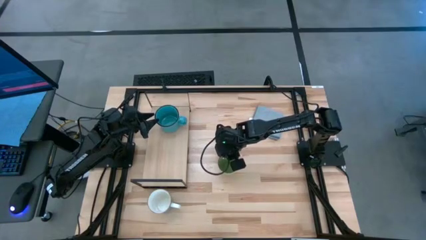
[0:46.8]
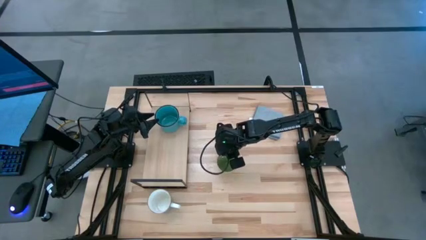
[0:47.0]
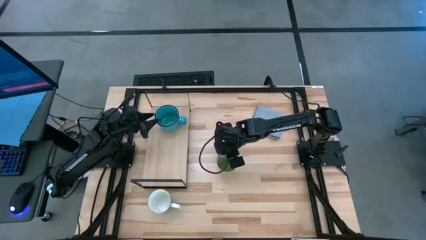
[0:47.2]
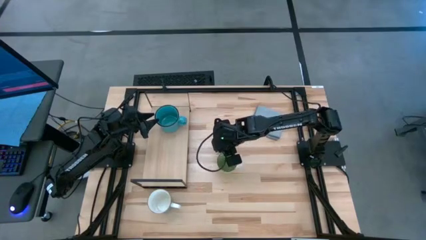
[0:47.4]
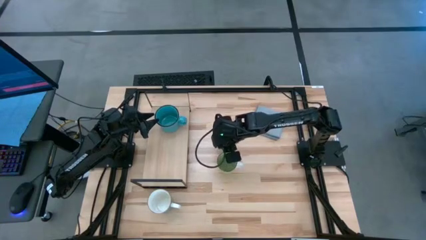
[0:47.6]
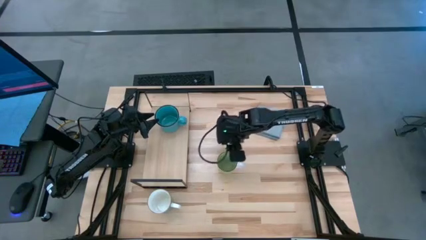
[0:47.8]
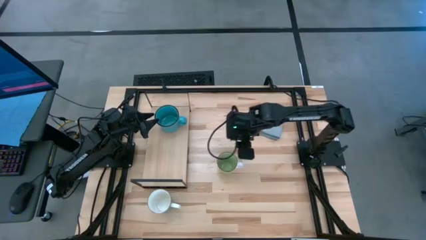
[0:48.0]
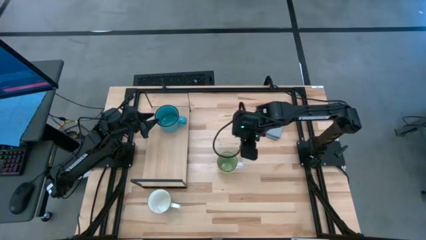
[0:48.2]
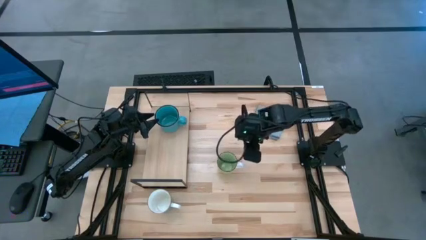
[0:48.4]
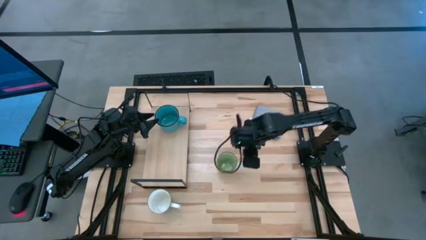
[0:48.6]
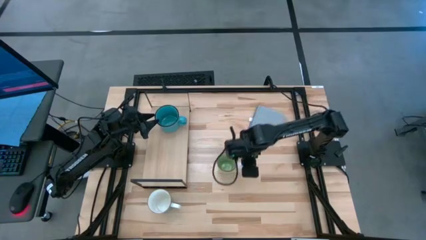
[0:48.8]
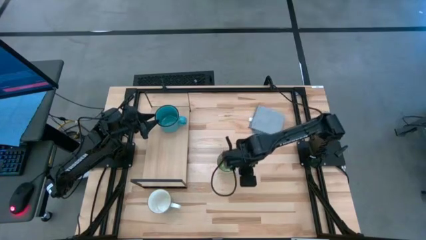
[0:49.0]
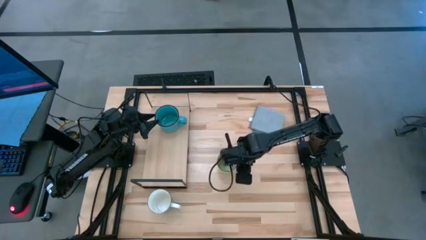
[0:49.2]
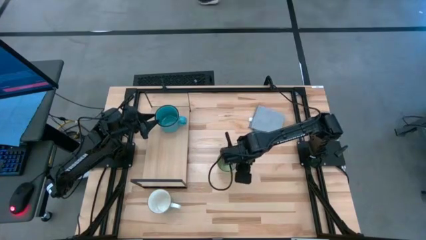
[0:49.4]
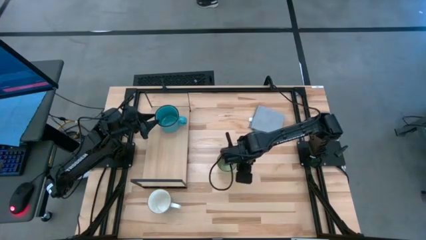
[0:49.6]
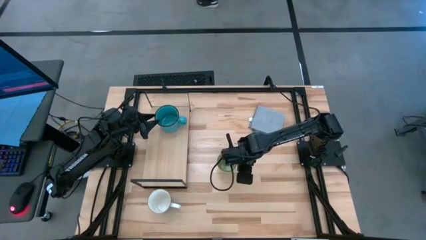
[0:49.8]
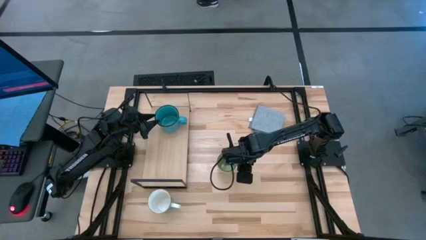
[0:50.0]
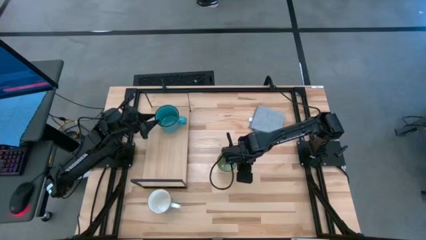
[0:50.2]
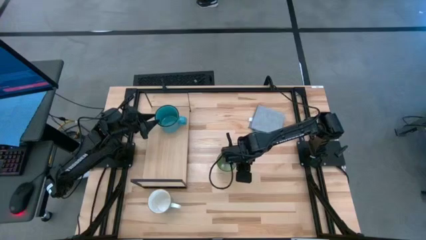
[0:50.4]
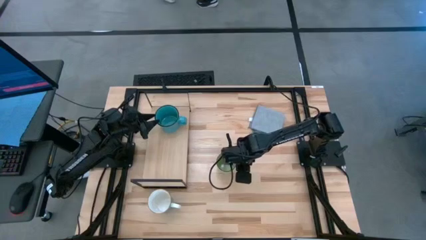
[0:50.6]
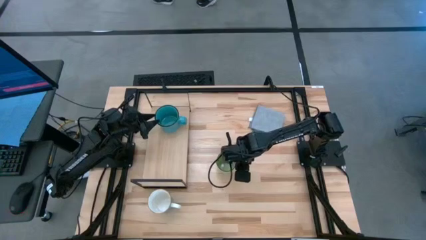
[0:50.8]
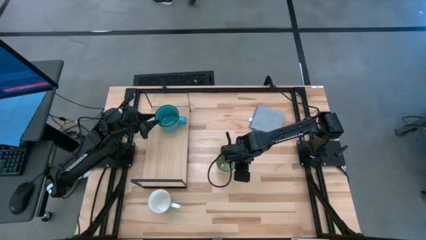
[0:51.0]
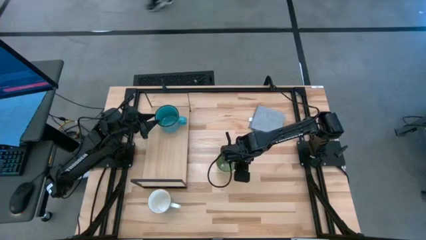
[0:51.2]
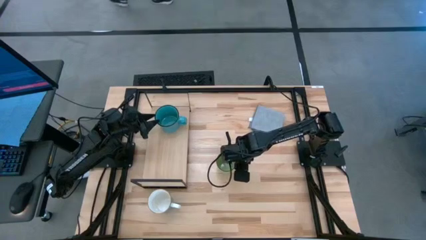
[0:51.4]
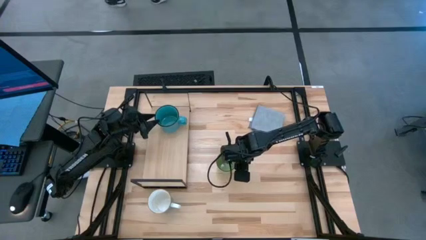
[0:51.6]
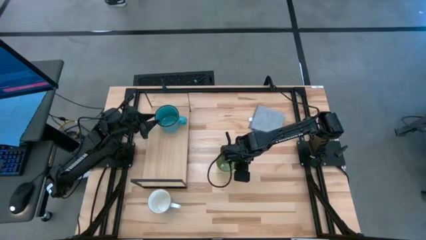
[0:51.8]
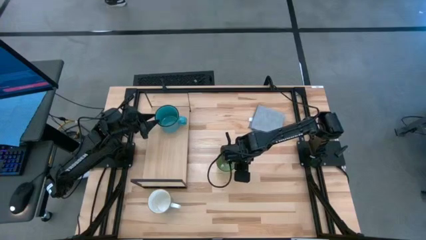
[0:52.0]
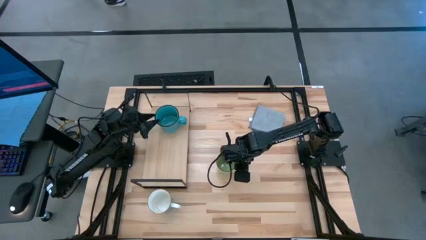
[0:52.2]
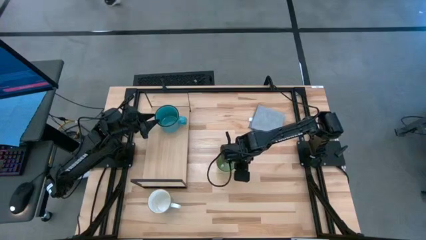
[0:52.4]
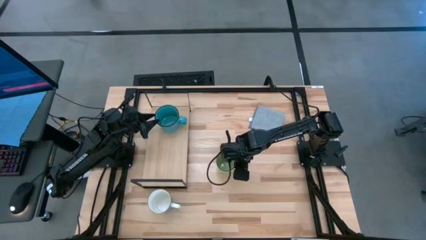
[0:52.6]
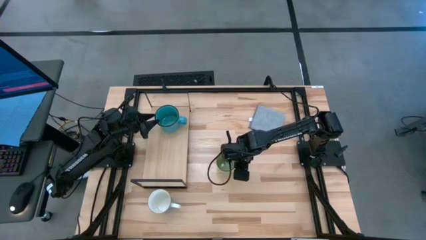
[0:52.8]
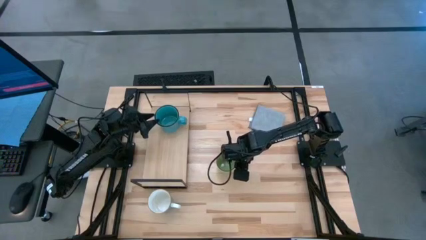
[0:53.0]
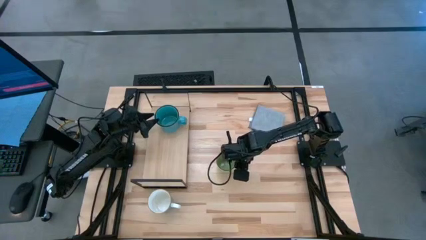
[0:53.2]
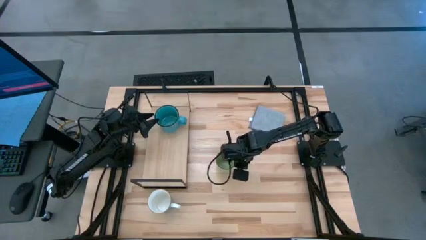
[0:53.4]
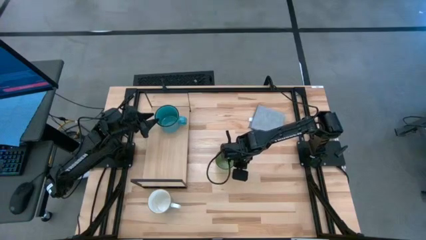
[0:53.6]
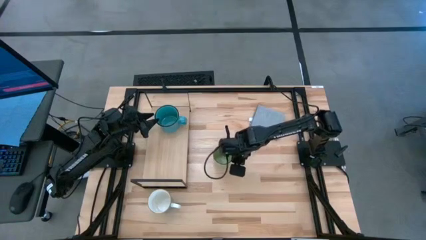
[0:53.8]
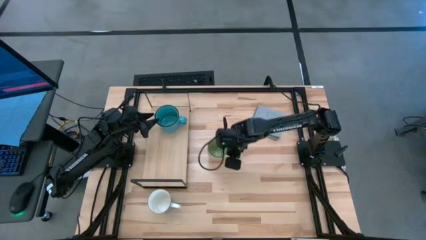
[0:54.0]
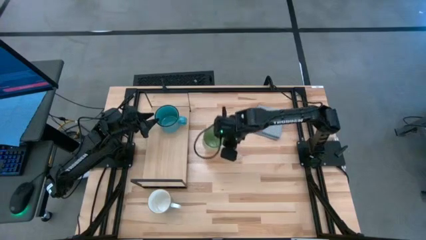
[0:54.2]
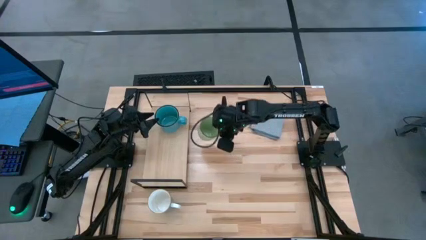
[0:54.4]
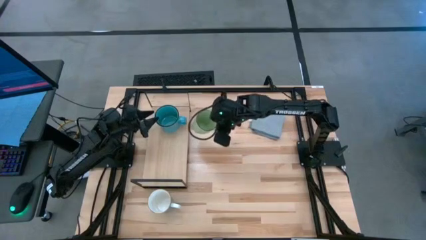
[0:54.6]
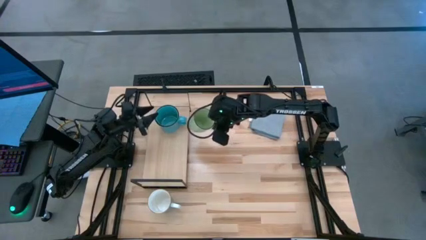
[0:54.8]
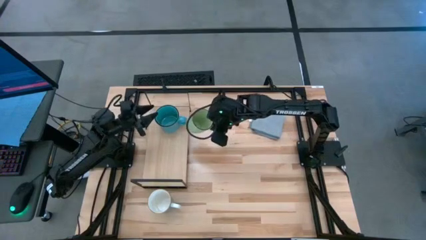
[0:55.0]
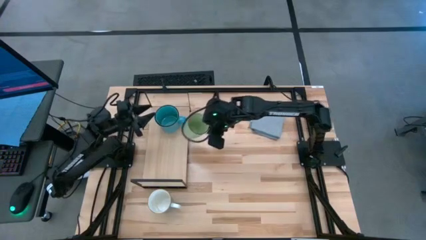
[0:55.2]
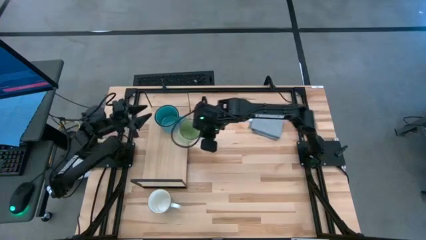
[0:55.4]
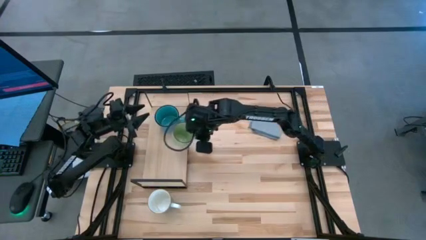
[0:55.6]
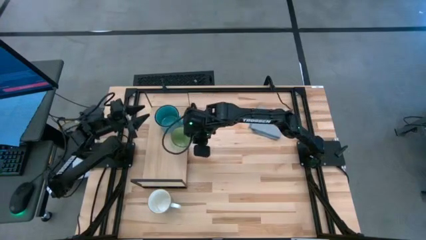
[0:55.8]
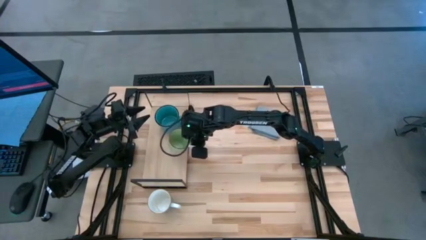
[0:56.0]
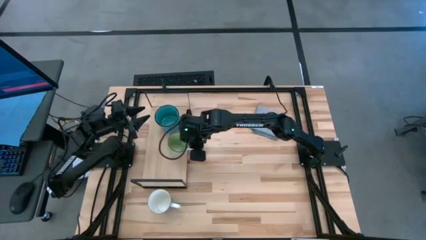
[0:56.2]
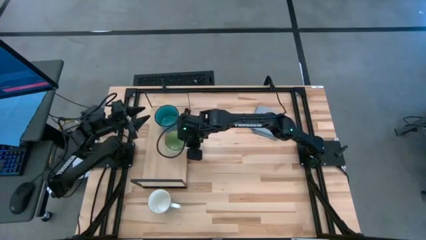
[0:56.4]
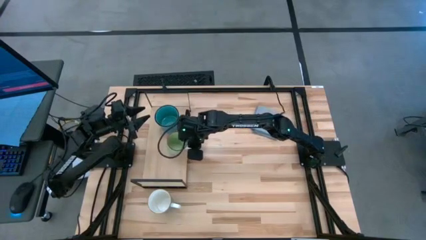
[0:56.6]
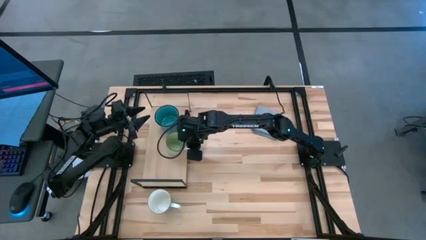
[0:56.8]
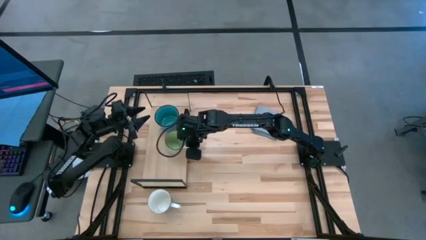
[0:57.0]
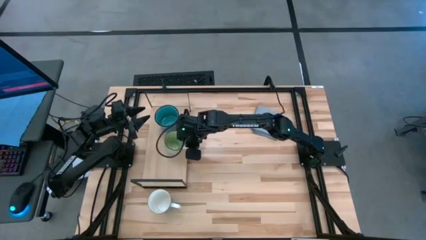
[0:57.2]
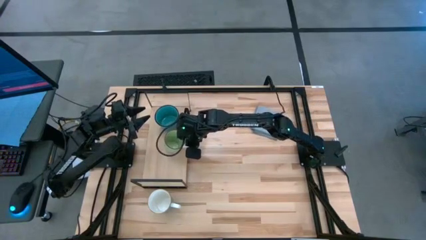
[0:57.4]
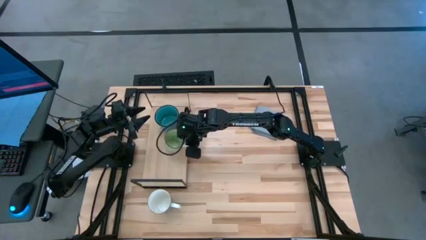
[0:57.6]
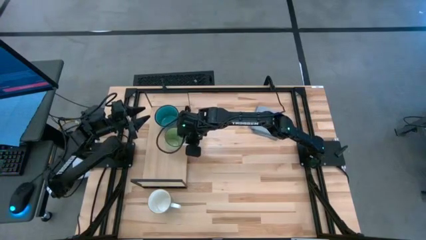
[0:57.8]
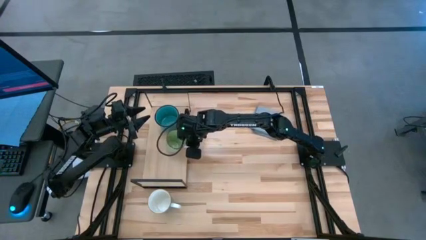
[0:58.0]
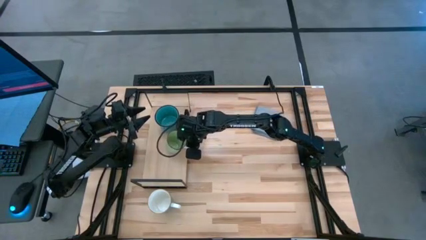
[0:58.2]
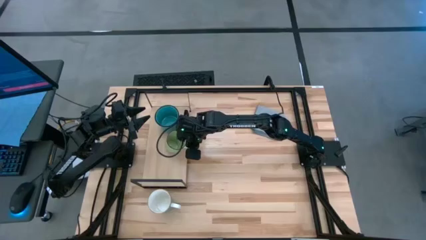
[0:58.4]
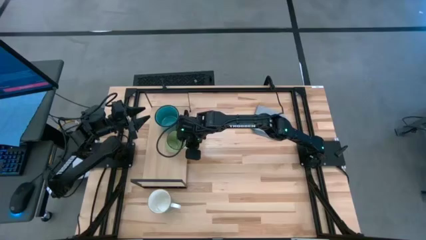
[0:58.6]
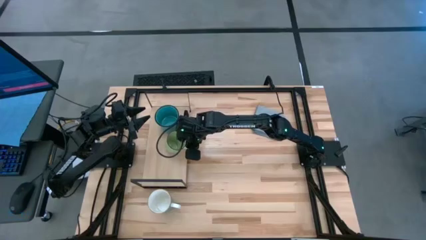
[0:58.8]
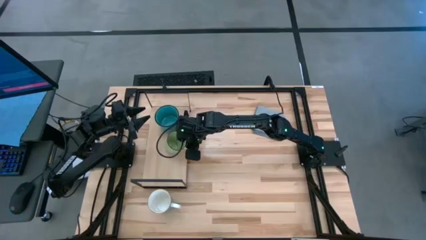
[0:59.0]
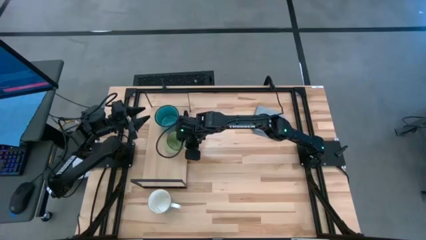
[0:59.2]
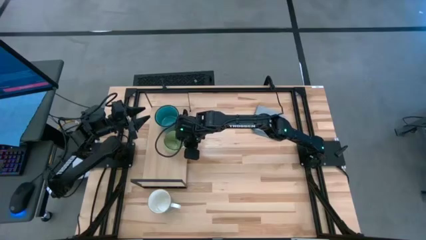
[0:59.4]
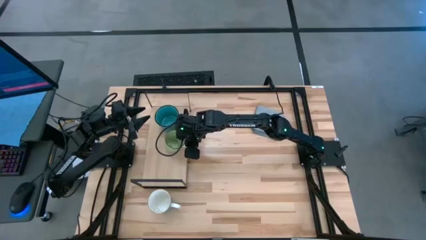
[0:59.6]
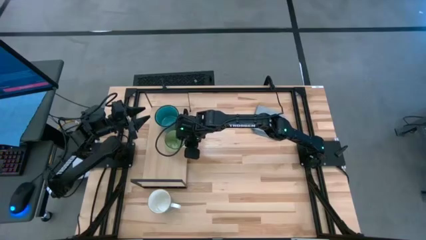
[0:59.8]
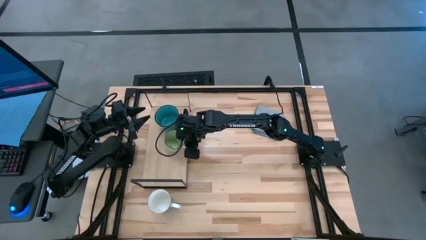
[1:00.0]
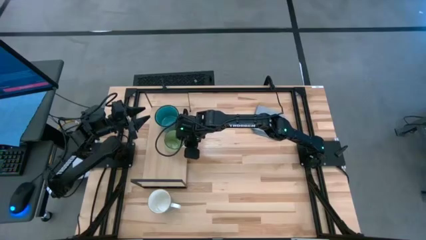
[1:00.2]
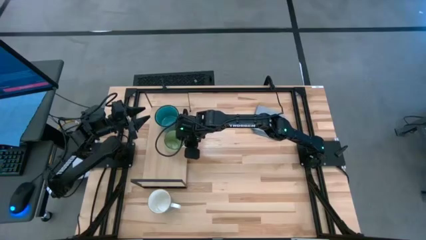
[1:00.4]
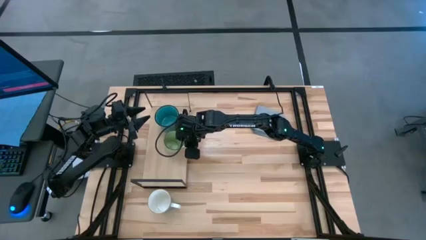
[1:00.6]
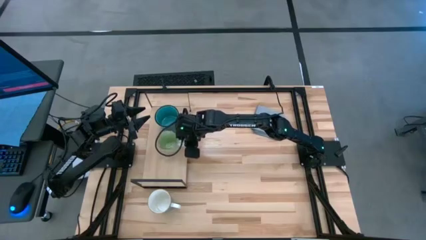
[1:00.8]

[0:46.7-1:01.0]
Task: Stack small to large cups/mugs on shelf
Put the green mug on the shelf

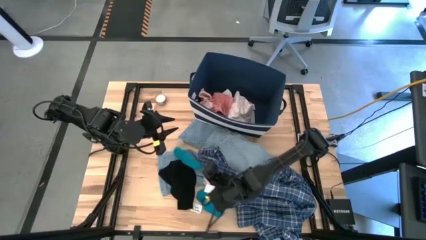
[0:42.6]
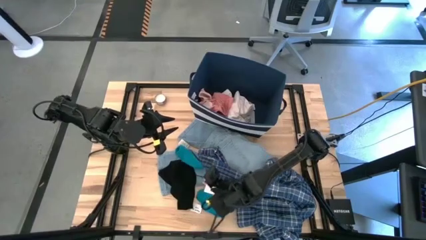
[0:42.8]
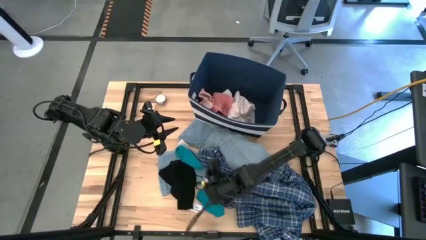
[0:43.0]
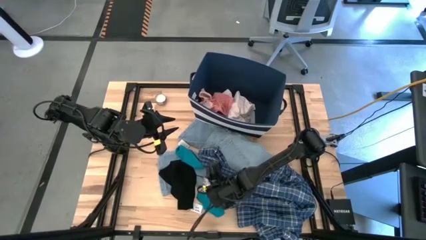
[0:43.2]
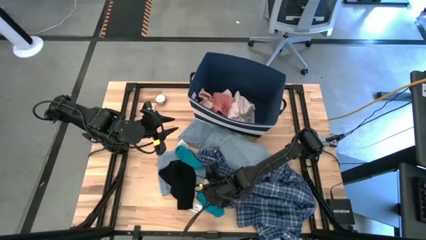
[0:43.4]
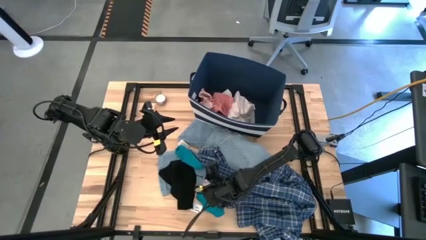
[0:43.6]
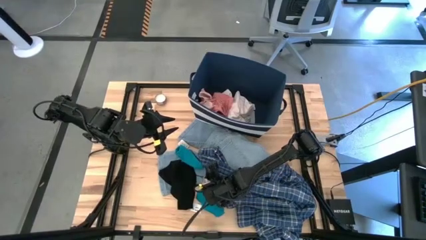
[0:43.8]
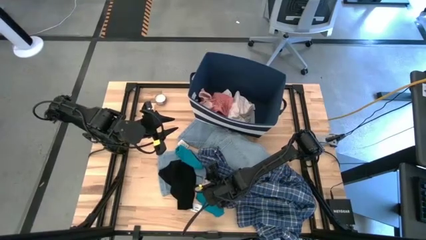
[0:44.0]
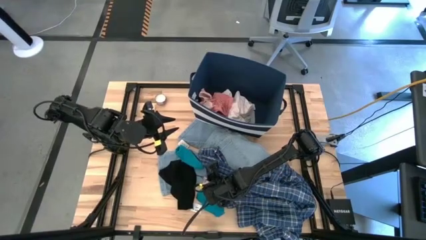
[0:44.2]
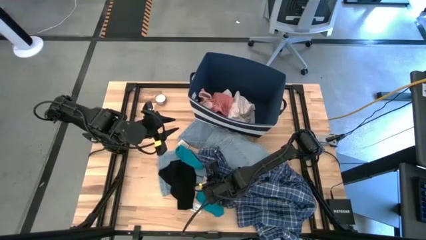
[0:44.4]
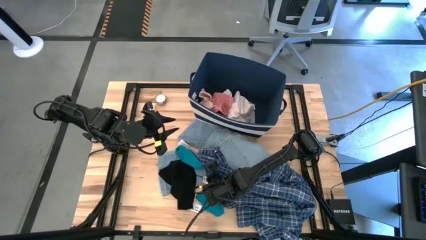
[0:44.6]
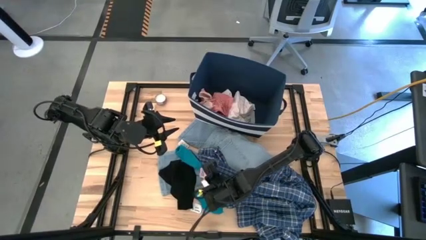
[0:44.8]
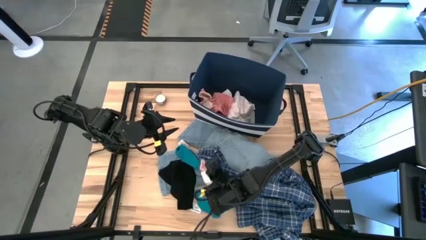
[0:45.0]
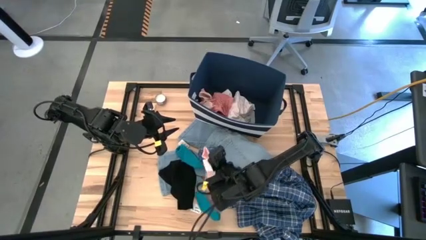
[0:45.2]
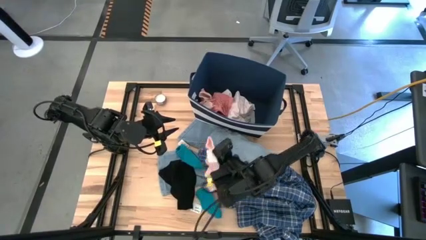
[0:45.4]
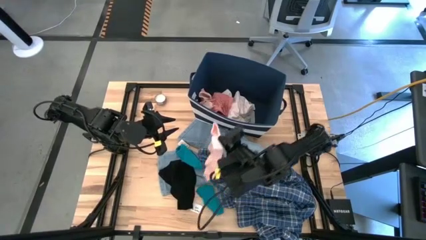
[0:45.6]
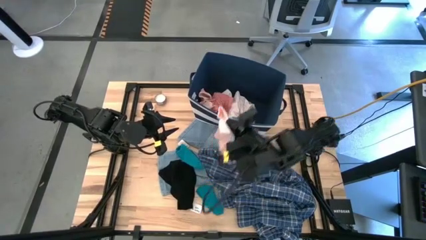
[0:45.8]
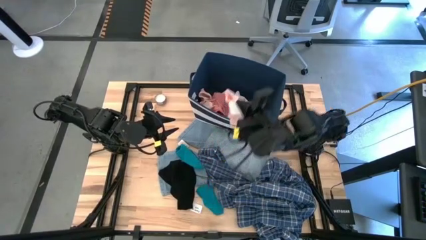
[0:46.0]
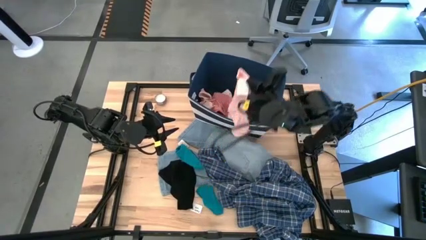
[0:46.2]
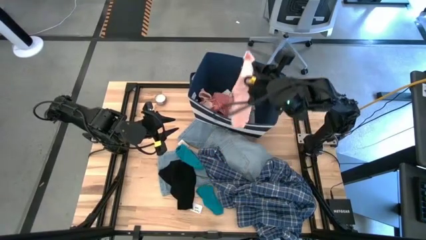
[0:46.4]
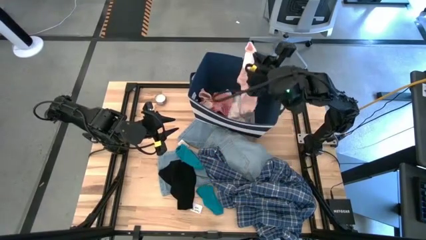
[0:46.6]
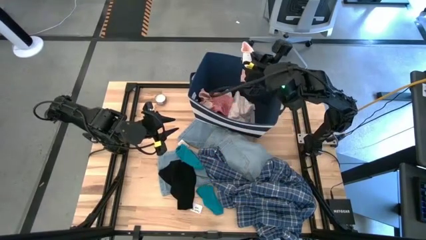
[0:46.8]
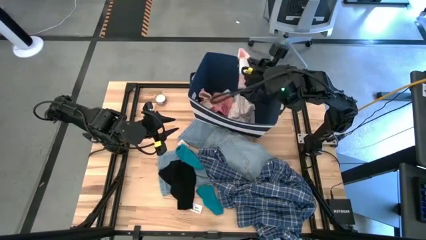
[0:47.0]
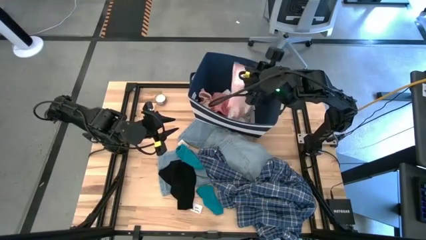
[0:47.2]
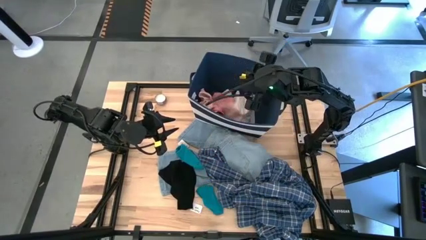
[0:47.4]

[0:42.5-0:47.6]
Task: Sort clothes
Put the pink sock into the blue laundry organizer
